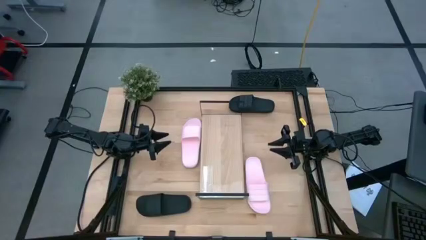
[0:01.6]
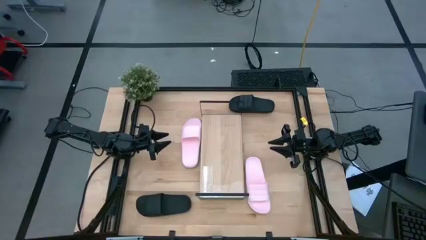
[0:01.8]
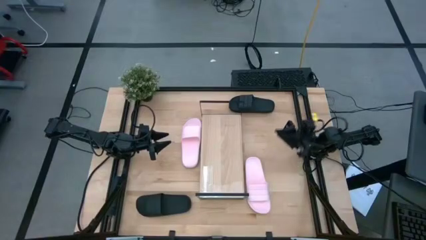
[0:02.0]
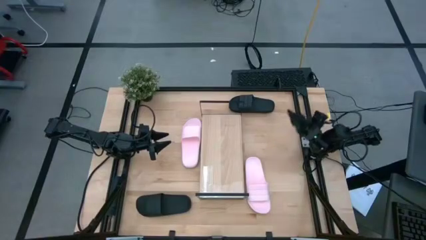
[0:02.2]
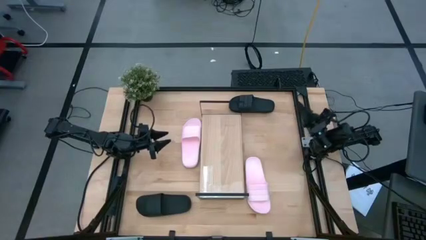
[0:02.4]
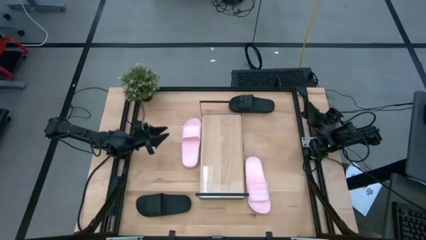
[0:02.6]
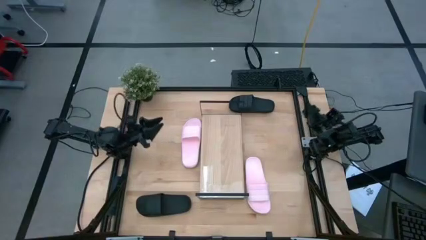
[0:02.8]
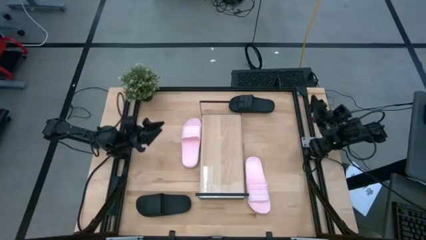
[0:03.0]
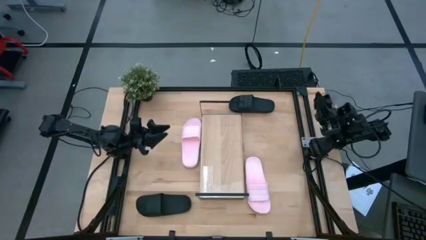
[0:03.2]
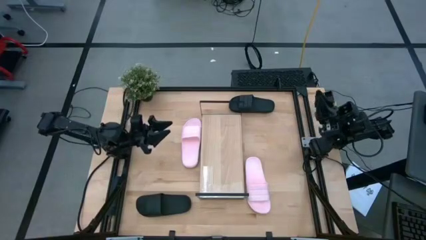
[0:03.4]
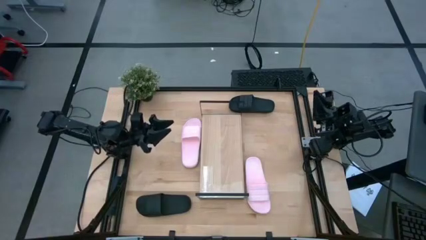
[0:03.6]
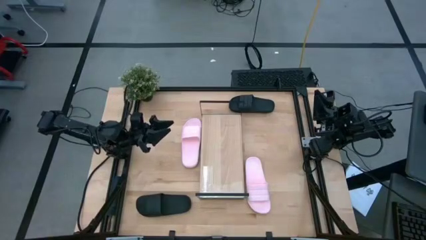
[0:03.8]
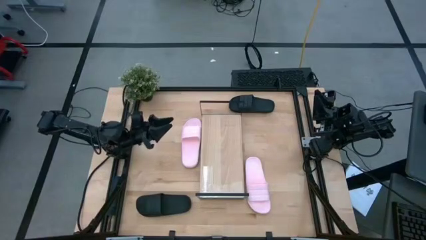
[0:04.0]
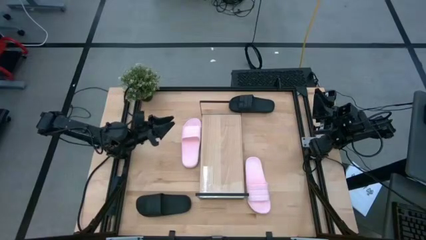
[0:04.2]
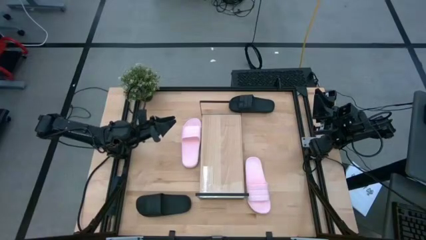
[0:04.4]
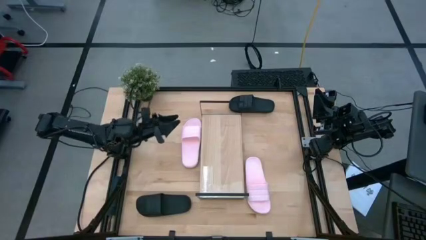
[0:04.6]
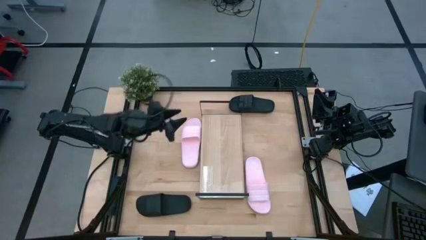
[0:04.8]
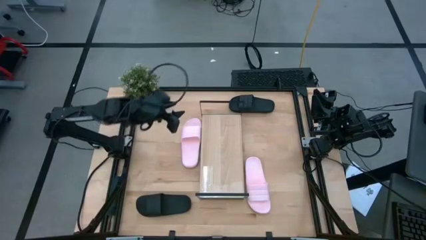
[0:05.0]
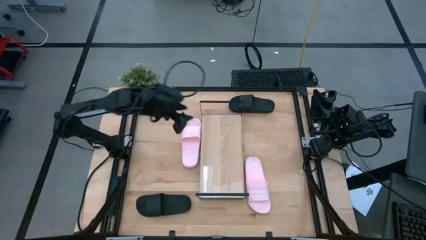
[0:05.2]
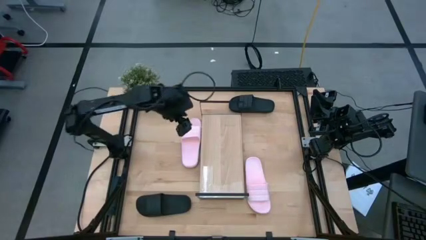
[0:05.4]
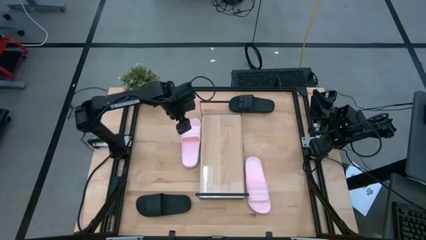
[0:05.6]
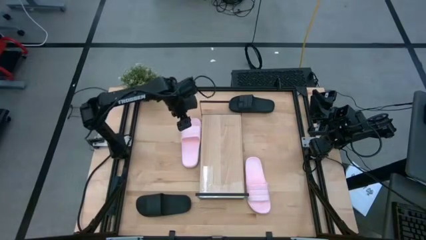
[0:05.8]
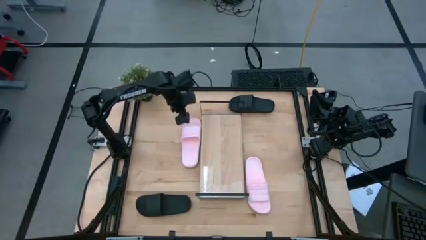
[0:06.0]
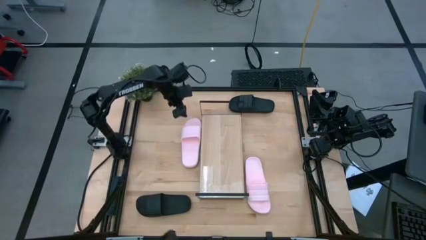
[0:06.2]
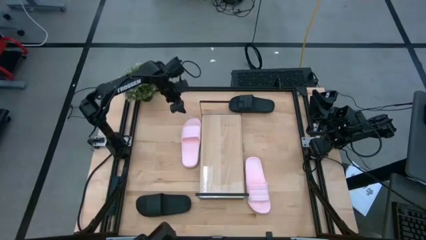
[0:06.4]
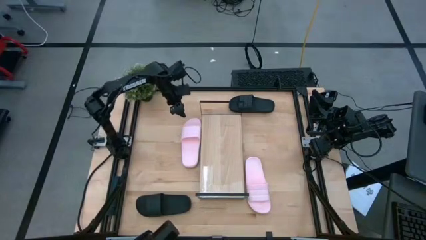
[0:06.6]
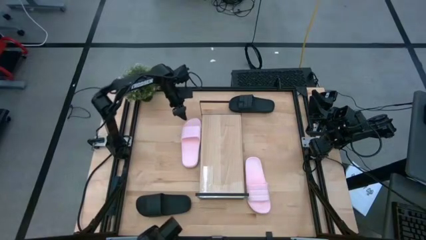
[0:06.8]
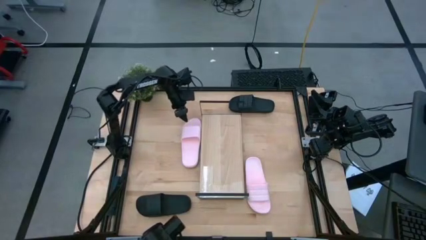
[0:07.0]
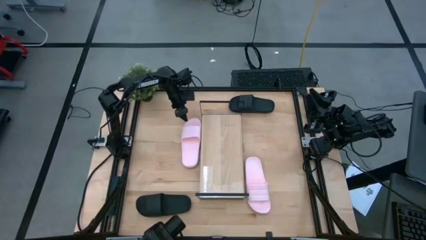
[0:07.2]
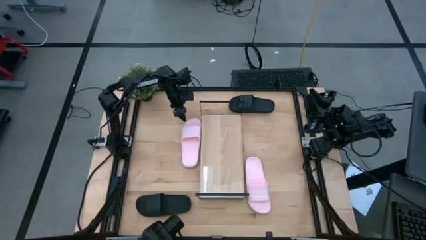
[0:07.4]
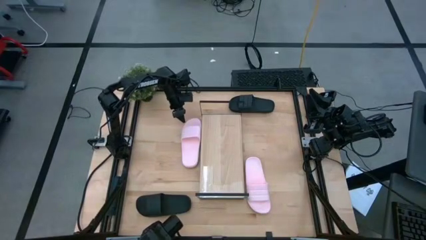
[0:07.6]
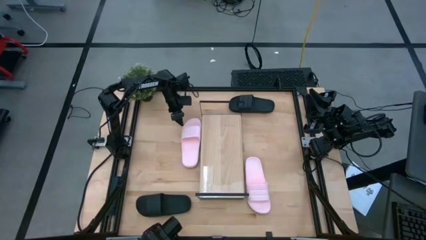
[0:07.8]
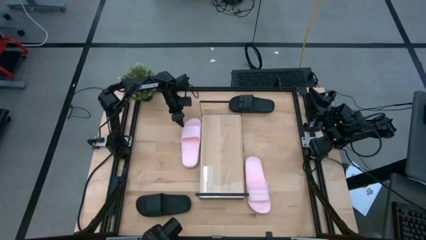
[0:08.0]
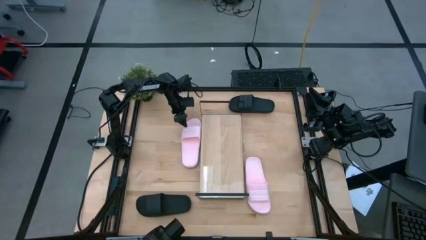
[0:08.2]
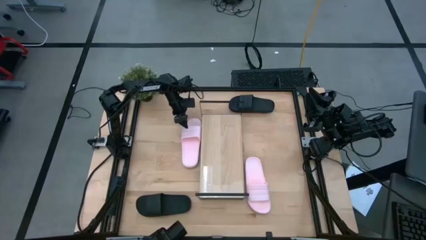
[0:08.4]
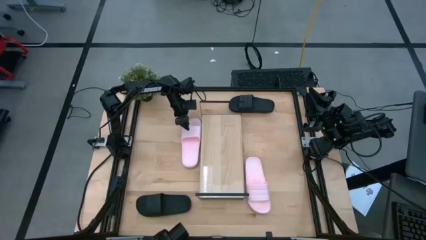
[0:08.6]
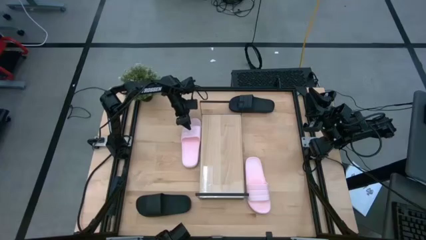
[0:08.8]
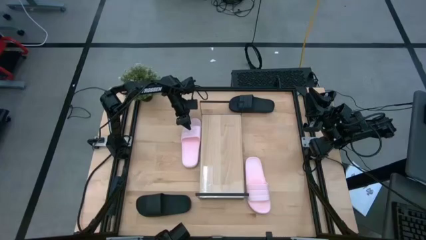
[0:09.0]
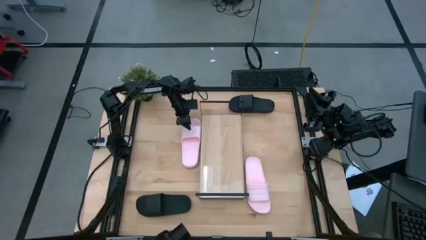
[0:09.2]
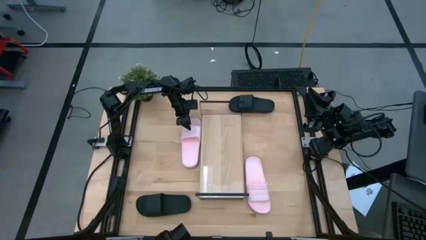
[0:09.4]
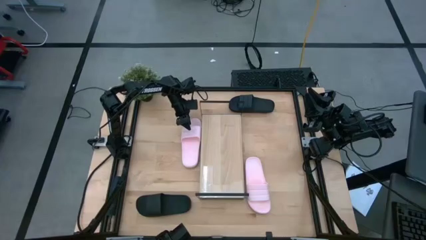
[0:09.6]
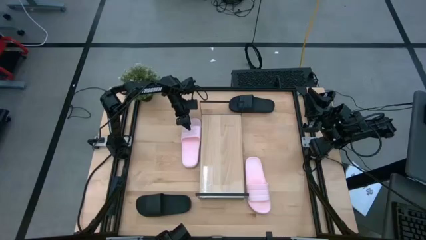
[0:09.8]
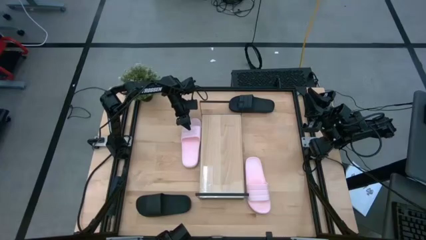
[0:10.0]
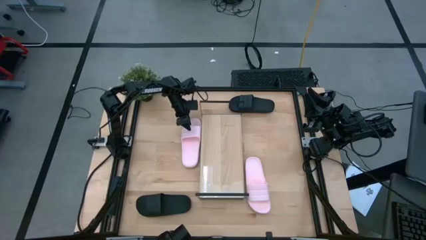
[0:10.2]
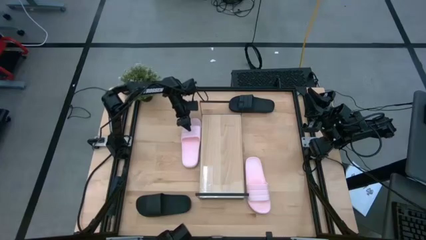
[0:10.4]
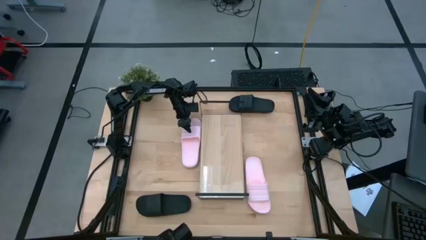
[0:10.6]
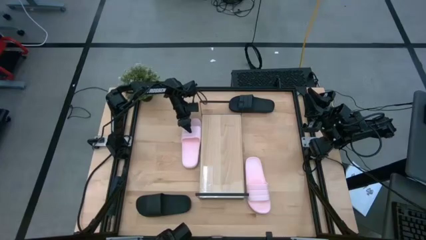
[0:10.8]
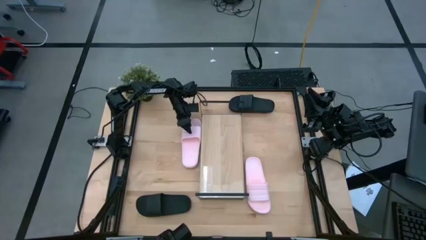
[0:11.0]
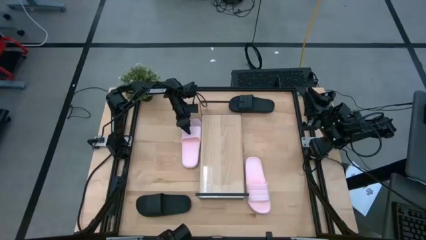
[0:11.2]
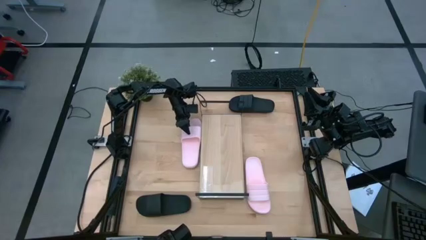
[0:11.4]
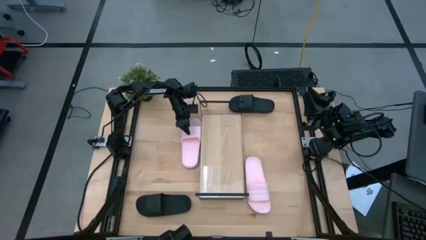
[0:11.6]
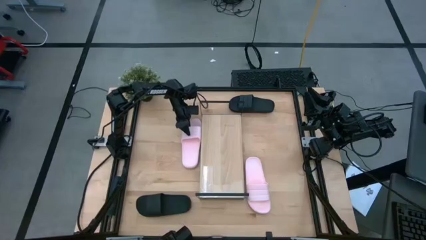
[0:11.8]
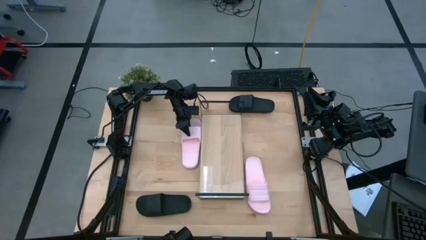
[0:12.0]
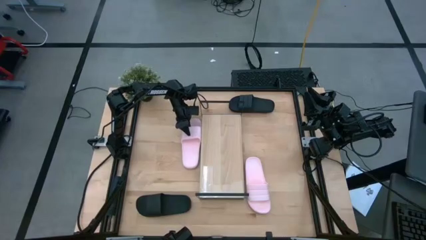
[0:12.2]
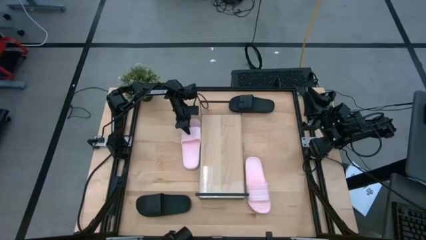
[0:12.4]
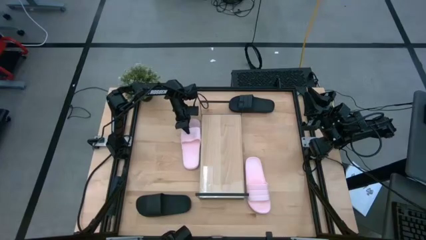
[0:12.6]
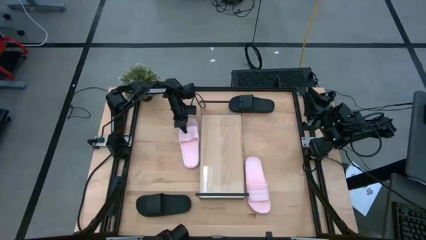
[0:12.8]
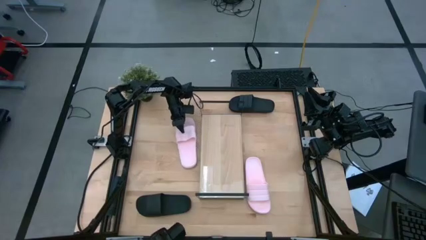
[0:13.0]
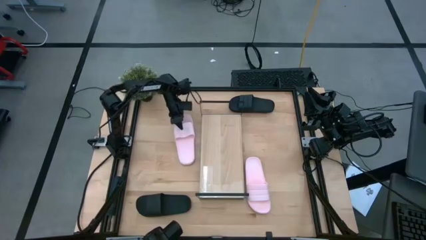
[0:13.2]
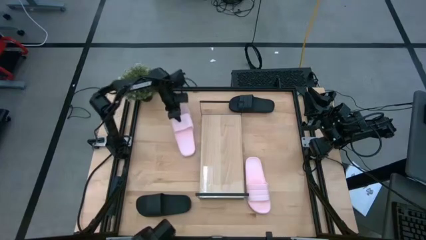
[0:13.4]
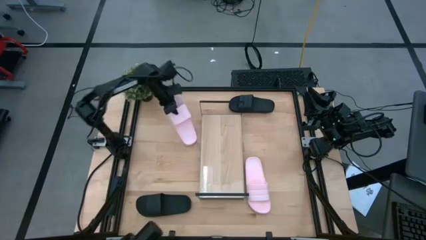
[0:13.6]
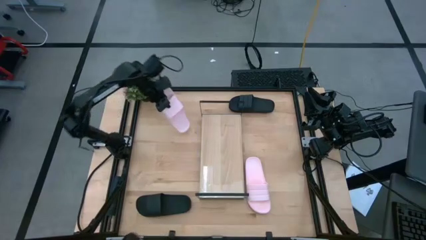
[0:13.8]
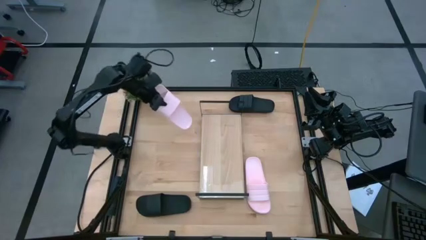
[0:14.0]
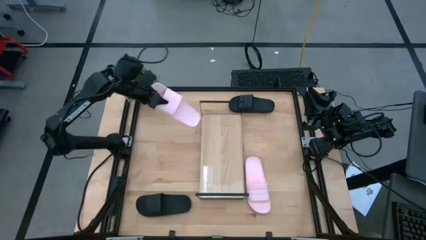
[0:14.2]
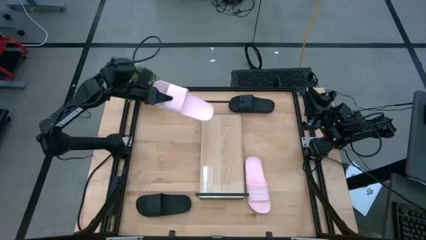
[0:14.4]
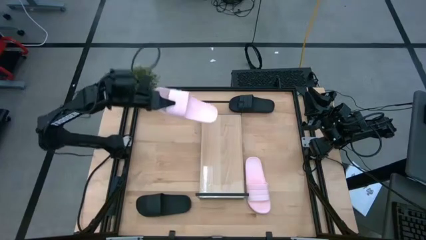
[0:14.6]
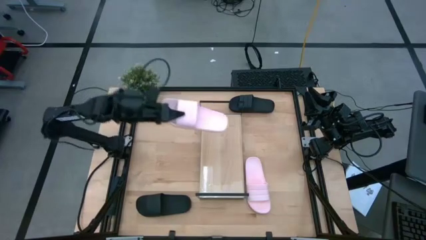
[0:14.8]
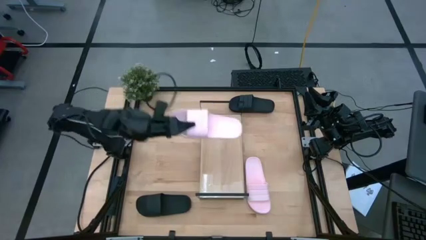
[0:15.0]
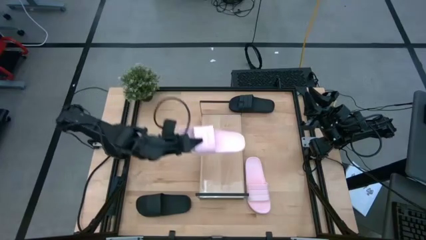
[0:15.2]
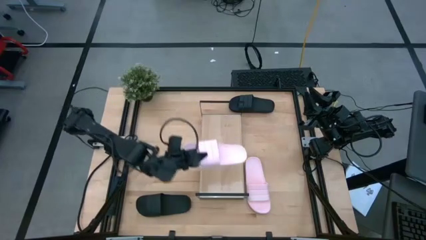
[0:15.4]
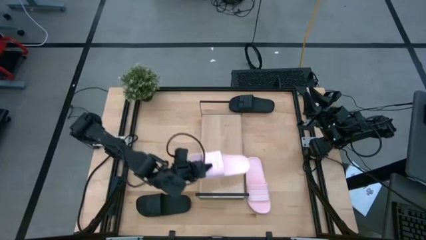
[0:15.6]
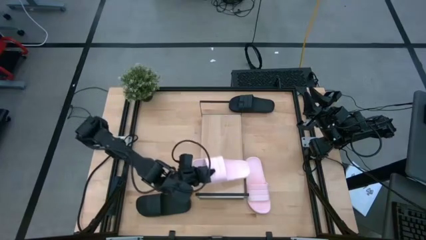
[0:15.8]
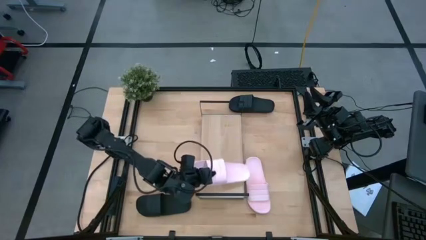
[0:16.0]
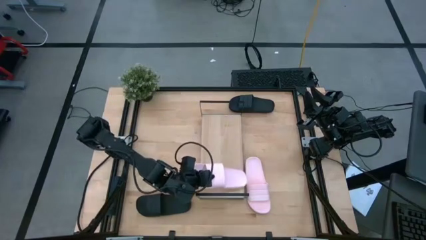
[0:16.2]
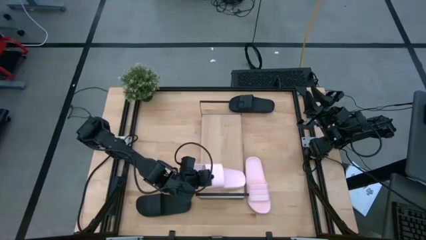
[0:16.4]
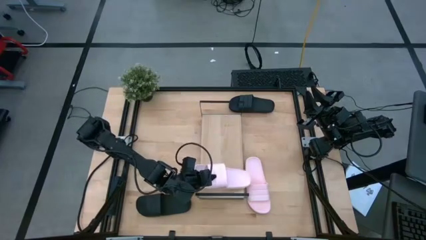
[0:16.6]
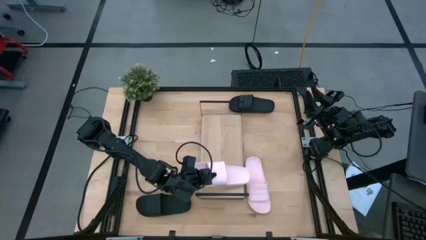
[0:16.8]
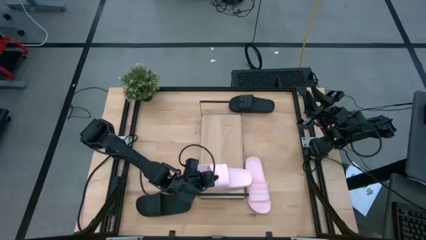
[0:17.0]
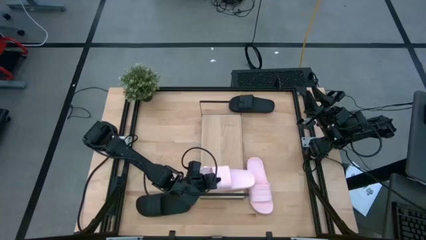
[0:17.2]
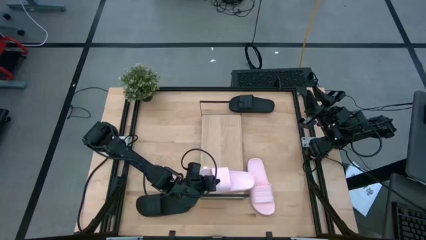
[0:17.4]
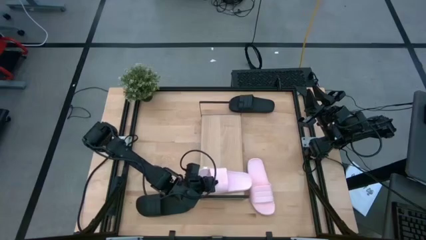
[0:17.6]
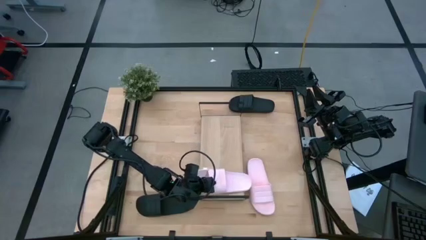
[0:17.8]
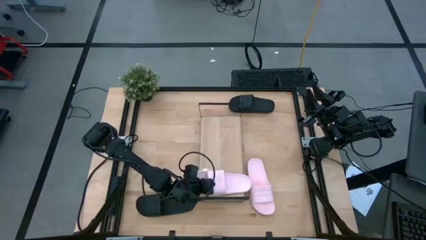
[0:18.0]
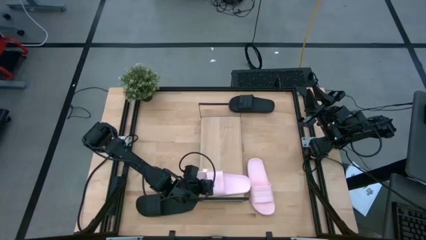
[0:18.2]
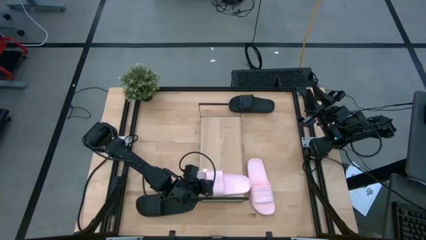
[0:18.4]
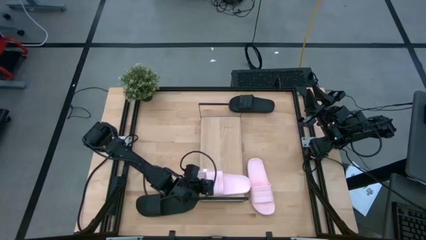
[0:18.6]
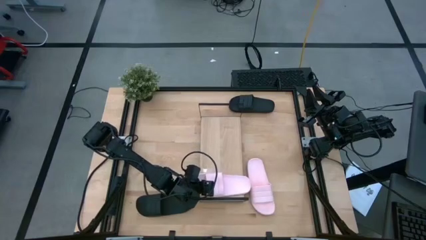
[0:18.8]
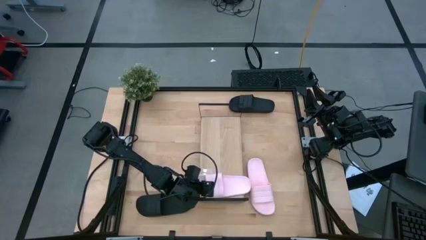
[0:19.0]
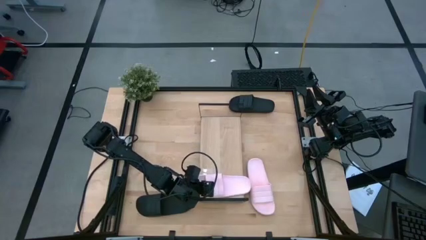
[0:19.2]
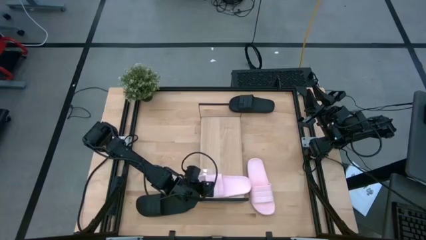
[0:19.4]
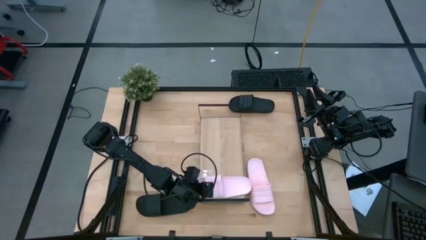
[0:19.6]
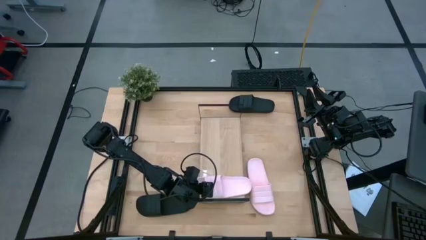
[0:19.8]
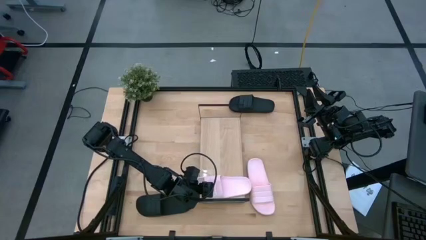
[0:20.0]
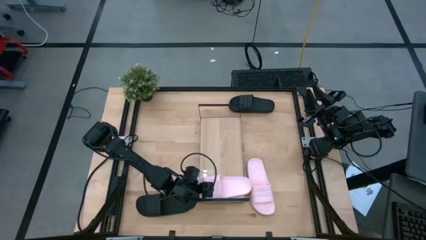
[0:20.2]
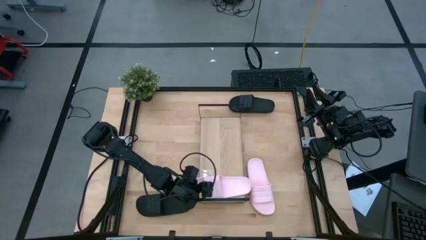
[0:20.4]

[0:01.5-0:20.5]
Task: Pick and place slides into the shelf
Put the top pink slipper on the shelf
